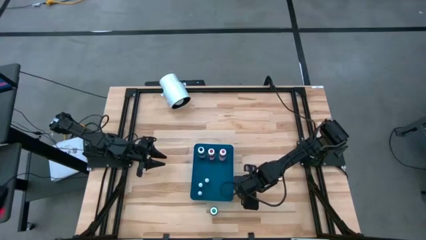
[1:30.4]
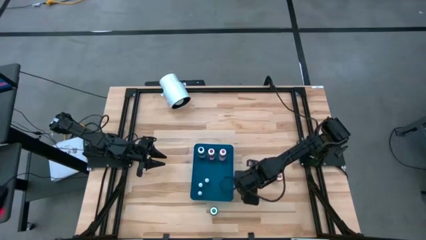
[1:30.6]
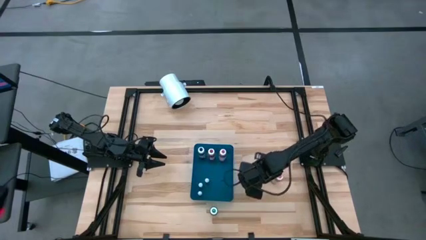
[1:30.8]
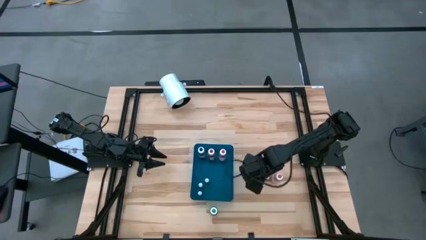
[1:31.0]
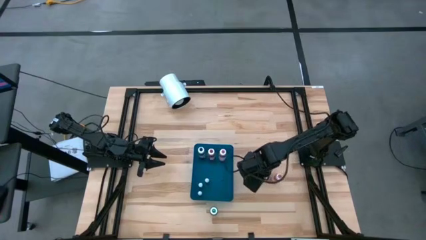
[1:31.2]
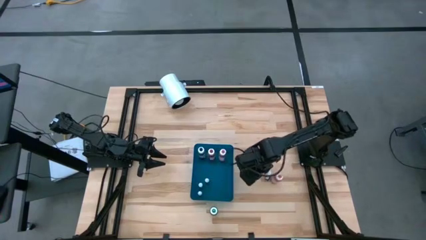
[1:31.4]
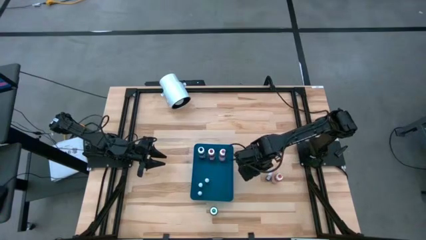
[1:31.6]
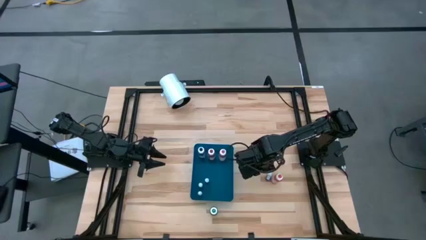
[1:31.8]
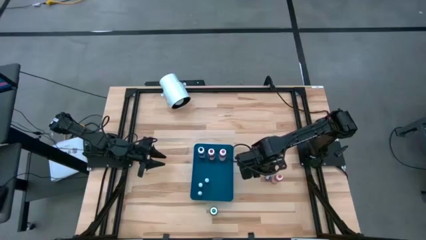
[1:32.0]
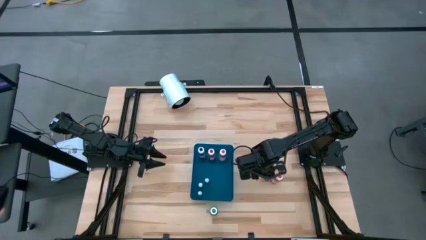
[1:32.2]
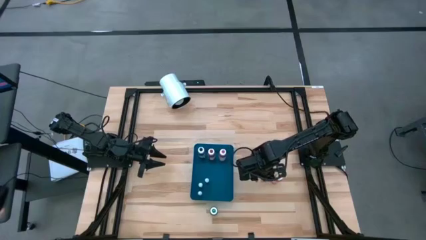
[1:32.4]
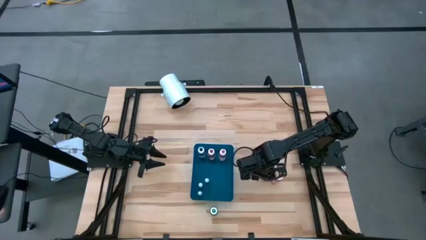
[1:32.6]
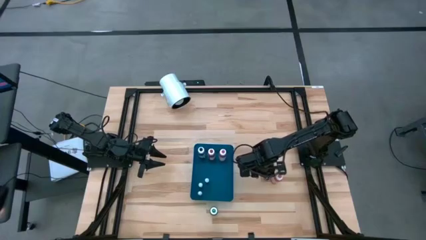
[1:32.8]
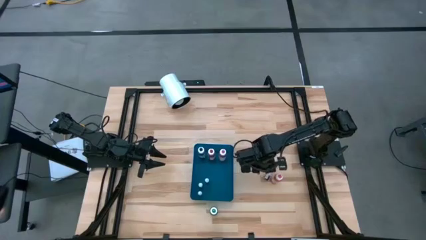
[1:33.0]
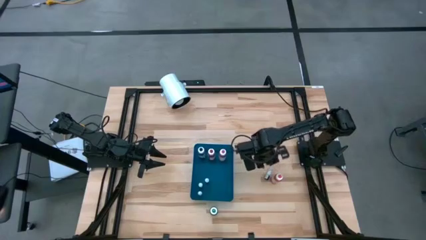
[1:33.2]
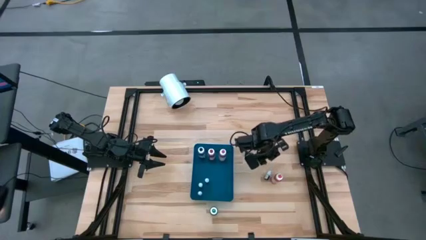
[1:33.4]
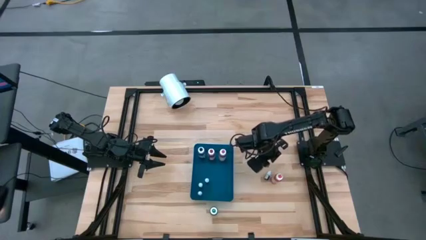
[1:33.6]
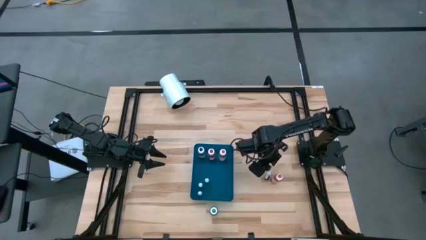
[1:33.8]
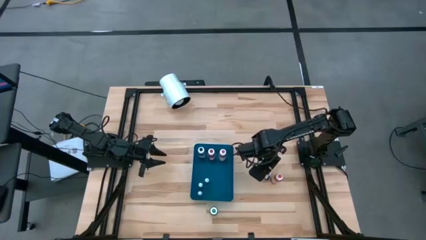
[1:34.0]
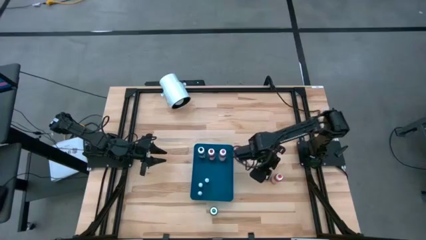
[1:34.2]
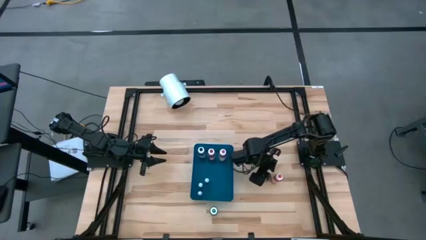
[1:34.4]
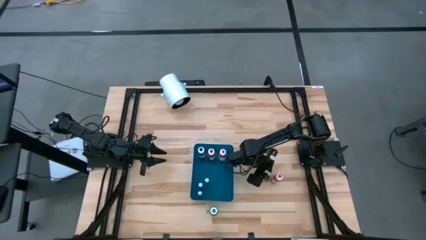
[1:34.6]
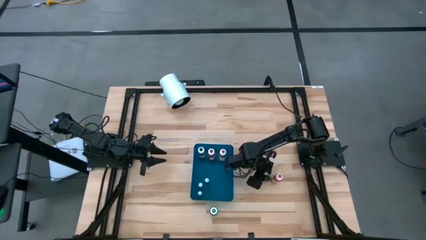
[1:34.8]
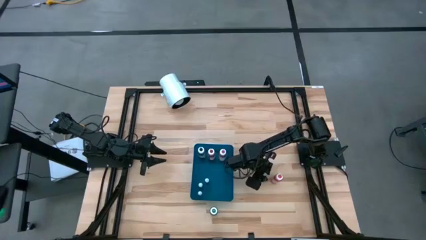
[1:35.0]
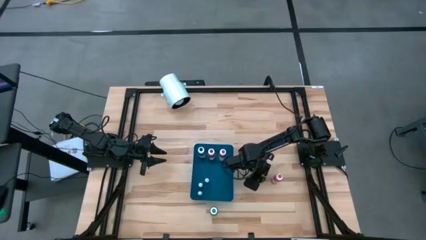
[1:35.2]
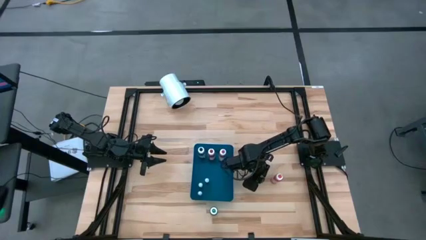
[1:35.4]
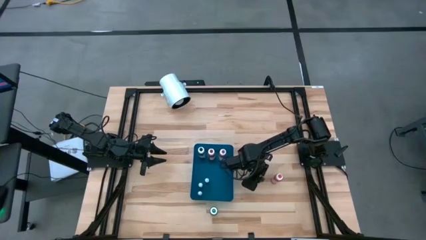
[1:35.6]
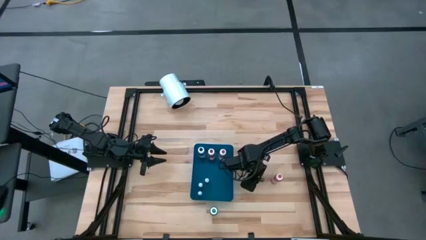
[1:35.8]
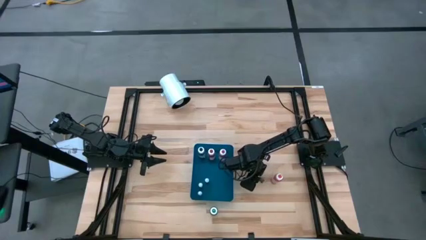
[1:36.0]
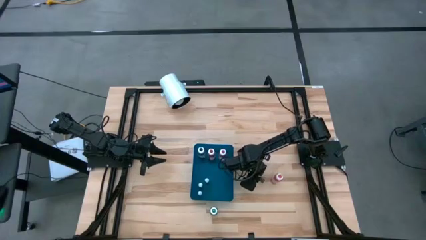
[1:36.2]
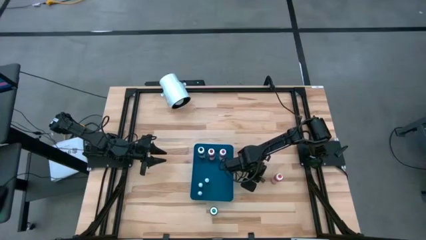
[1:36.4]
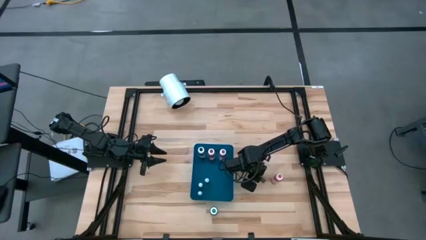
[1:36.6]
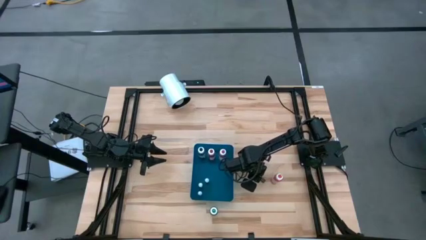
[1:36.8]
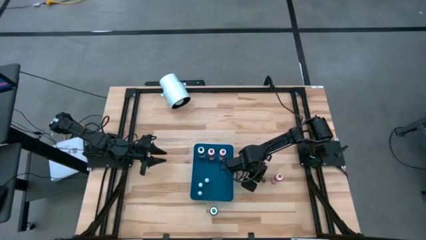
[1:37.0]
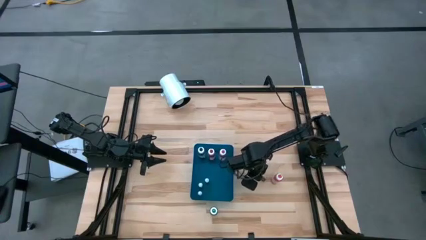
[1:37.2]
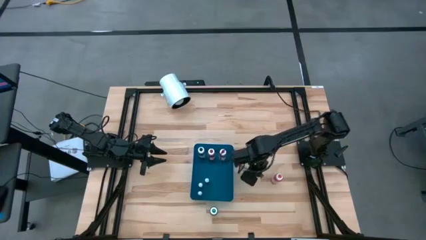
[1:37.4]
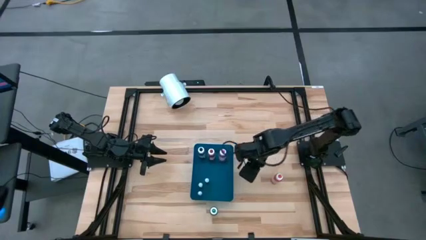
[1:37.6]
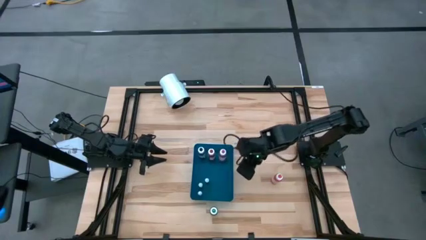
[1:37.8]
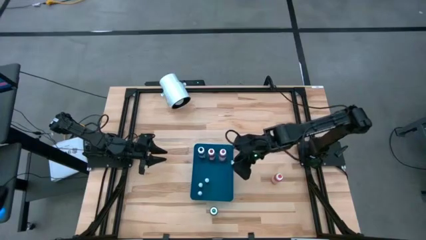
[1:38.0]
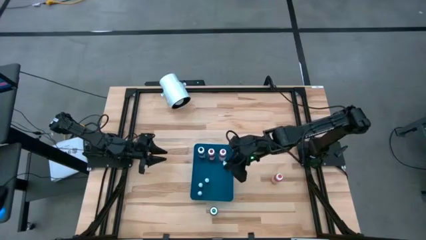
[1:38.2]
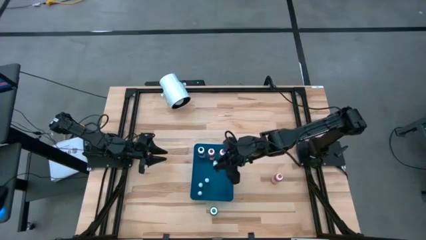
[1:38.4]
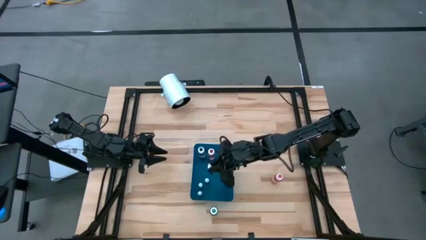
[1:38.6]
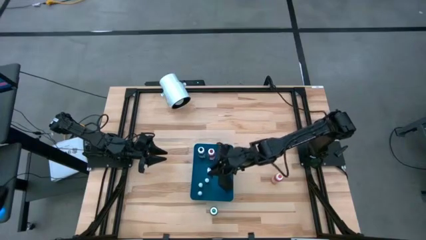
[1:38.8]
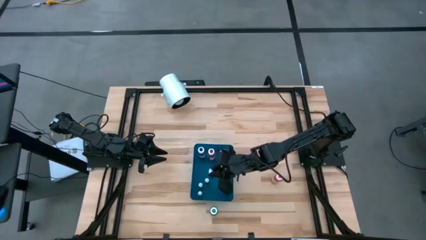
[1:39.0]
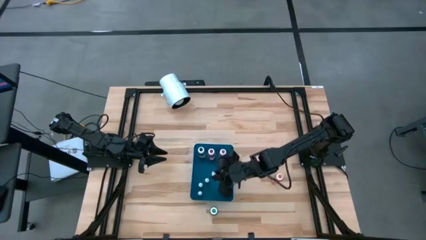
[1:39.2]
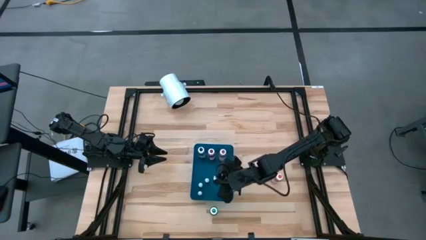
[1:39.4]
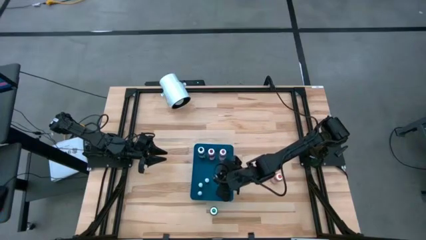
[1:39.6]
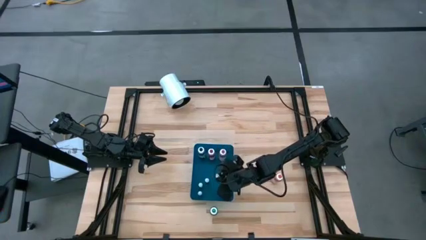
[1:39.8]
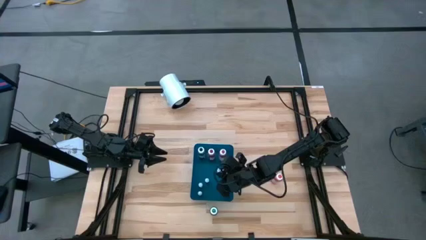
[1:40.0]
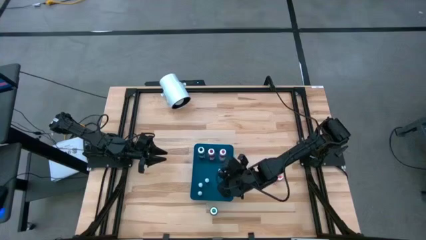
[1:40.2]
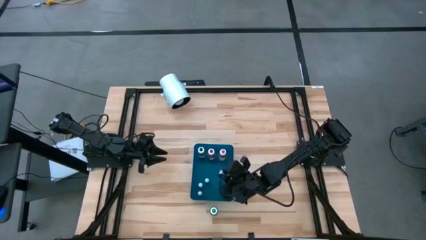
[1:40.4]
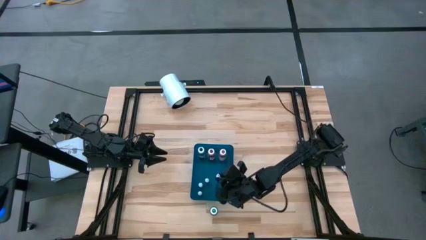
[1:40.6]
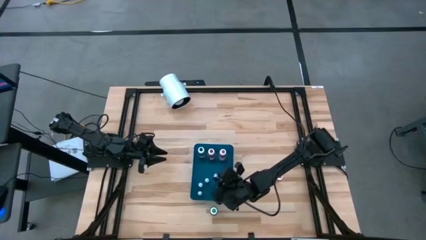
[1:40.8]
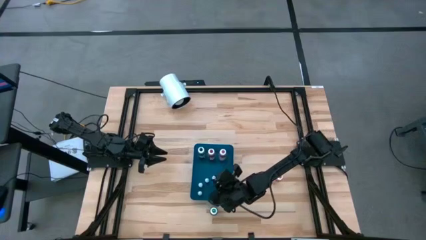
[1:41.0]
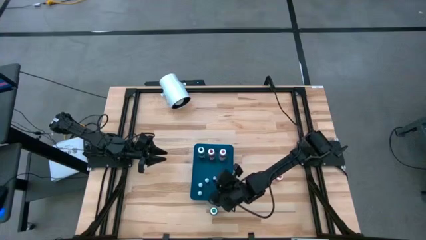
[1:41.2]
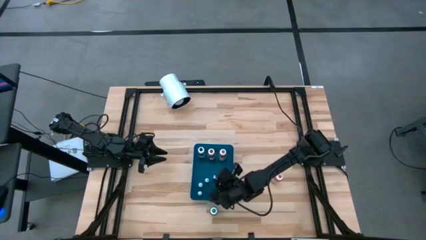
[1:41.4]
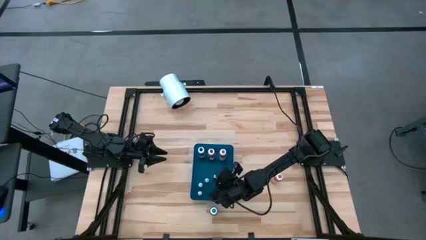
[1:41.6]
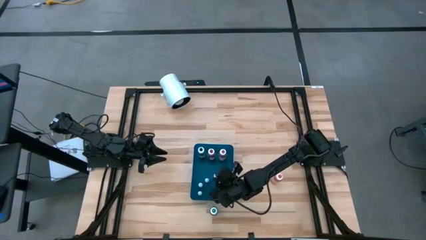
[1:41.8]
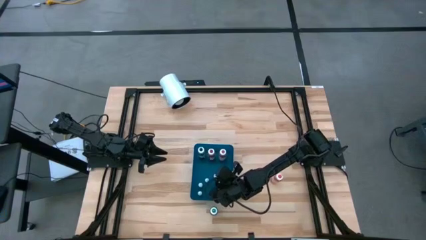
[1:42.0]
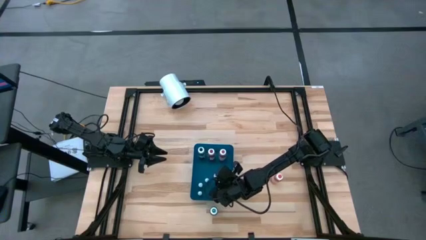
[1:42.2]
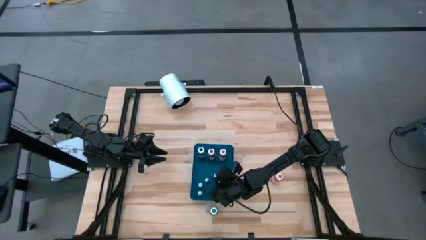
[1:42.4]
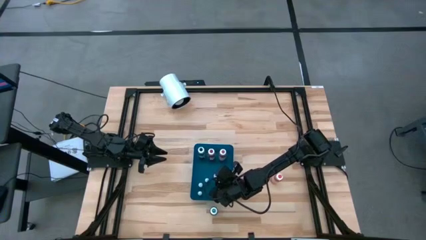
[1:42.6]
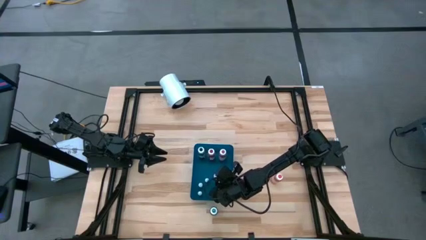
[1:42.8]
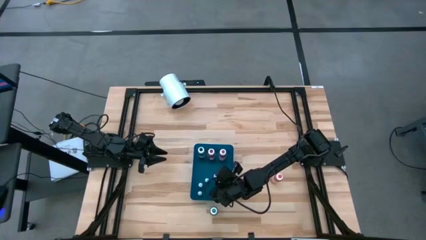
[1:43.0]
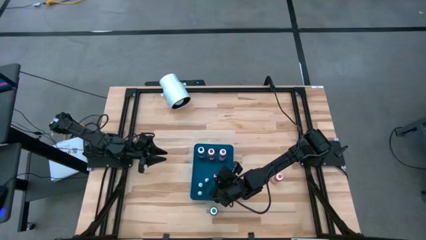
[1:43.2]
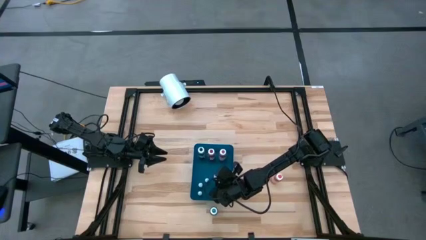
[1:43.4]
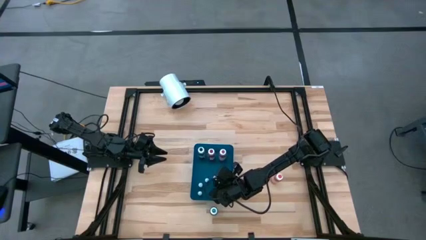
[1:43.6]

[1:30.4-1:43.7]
Task: Pick & Place food coloring
Put the small brown food coloring bottle into the blue bin
